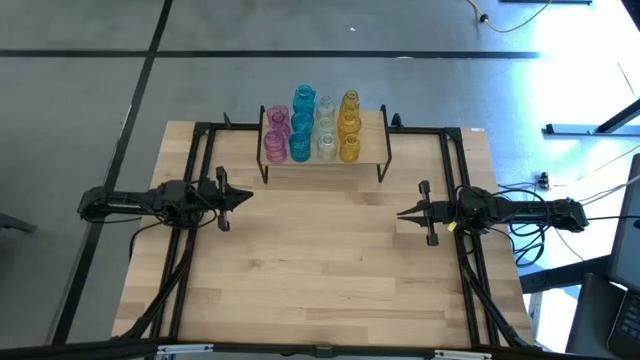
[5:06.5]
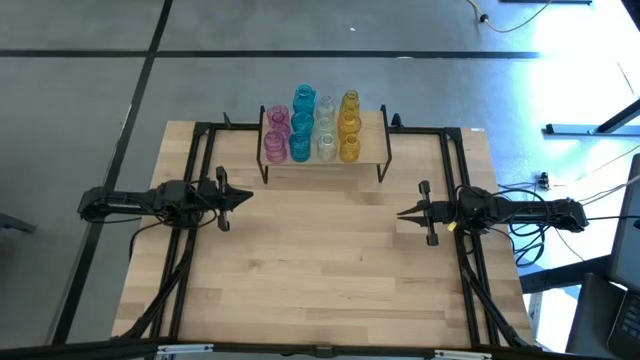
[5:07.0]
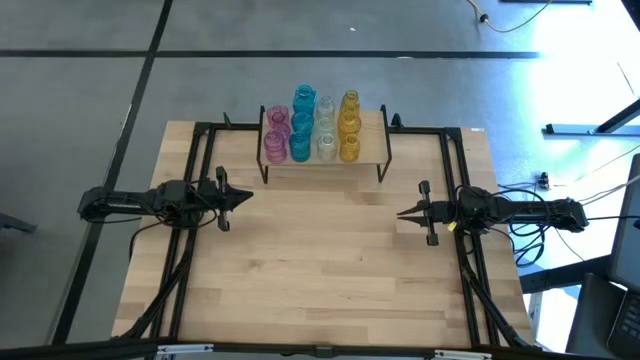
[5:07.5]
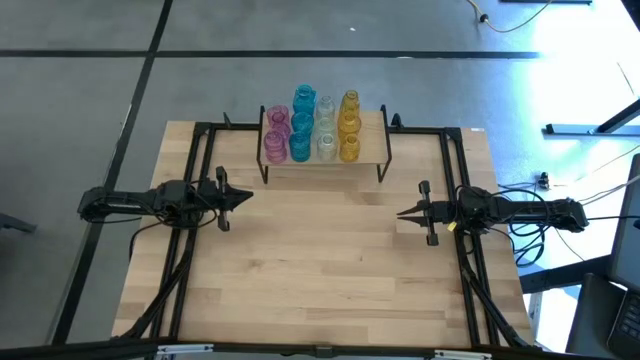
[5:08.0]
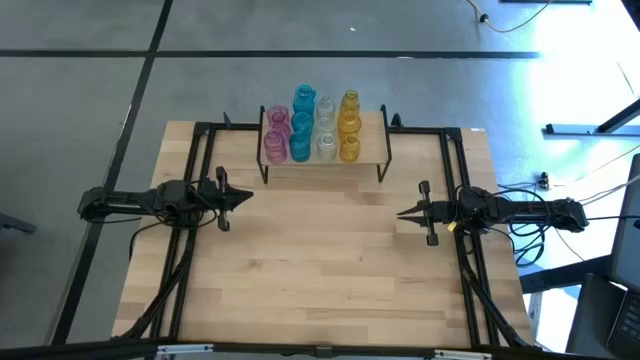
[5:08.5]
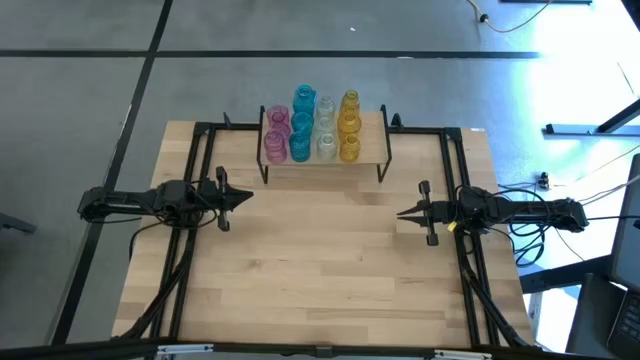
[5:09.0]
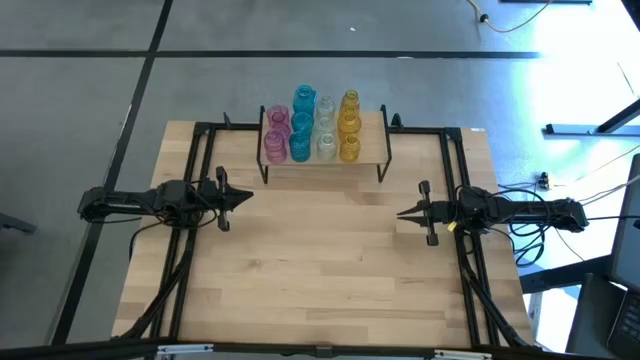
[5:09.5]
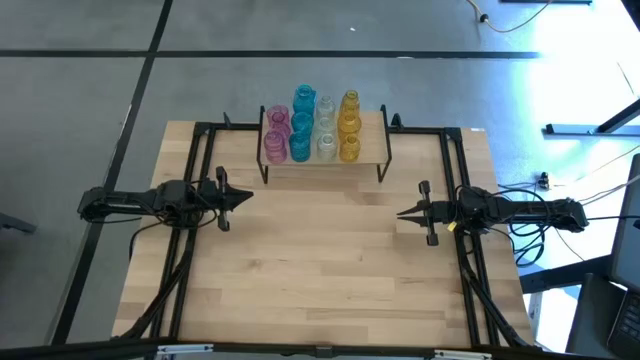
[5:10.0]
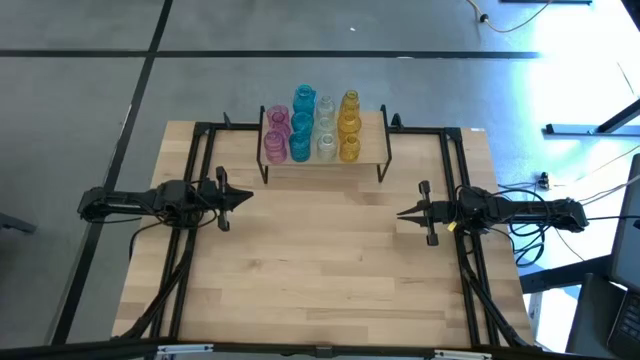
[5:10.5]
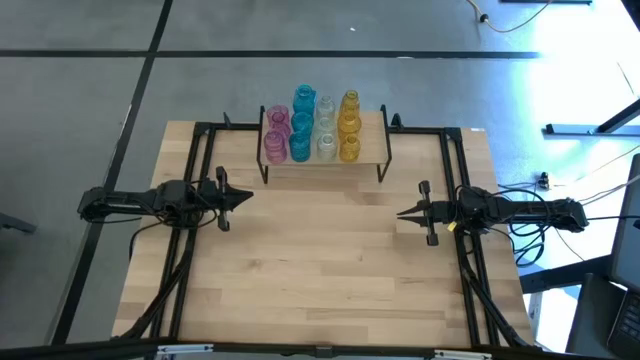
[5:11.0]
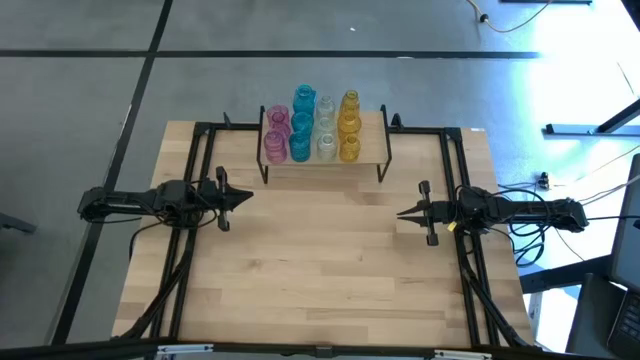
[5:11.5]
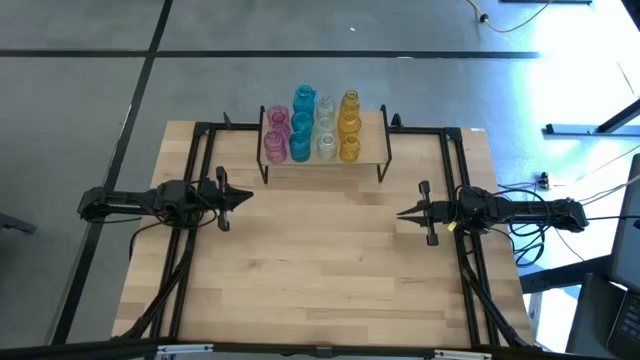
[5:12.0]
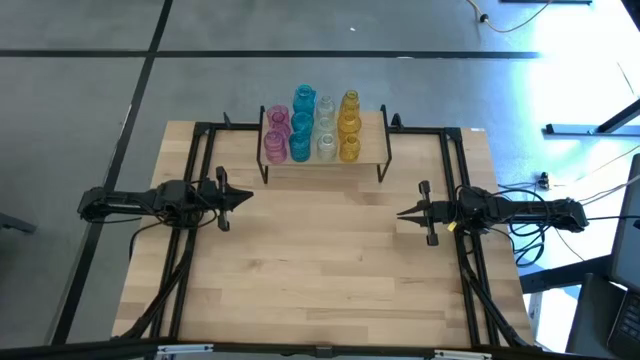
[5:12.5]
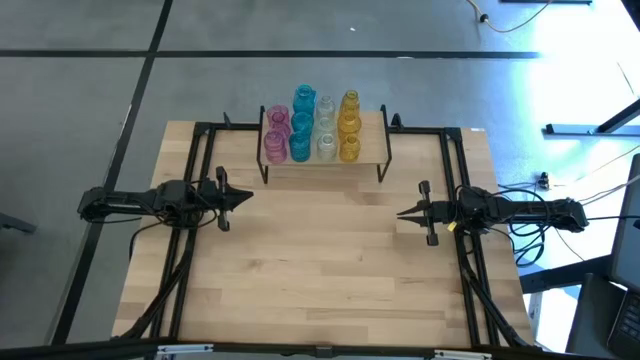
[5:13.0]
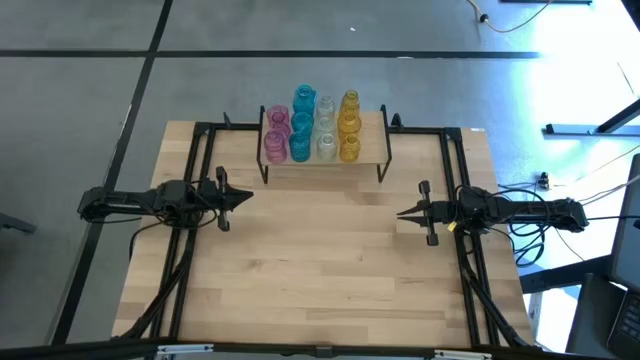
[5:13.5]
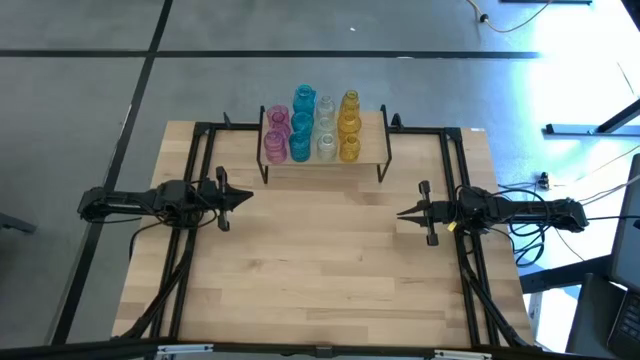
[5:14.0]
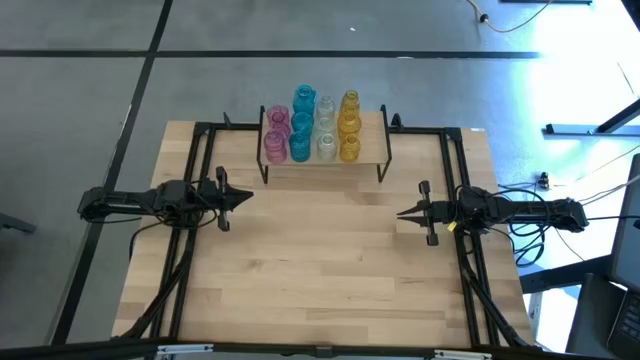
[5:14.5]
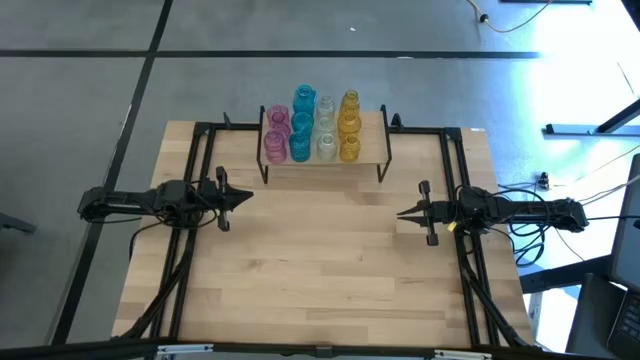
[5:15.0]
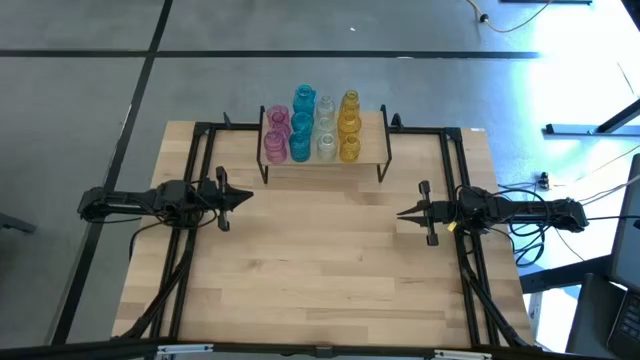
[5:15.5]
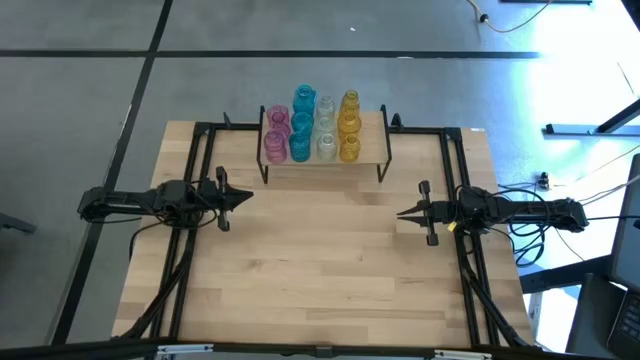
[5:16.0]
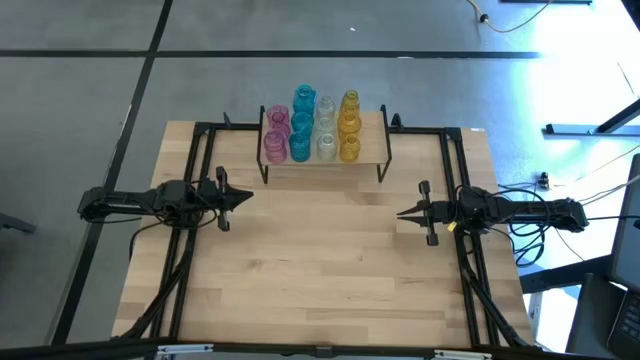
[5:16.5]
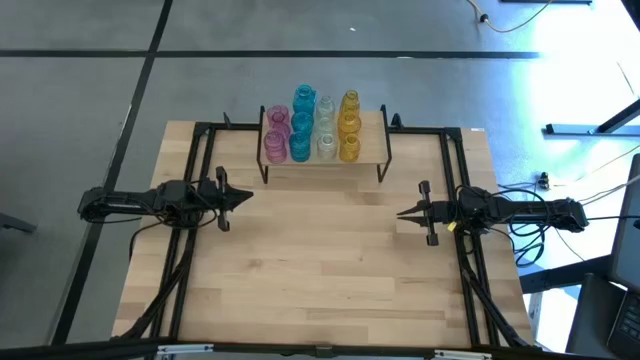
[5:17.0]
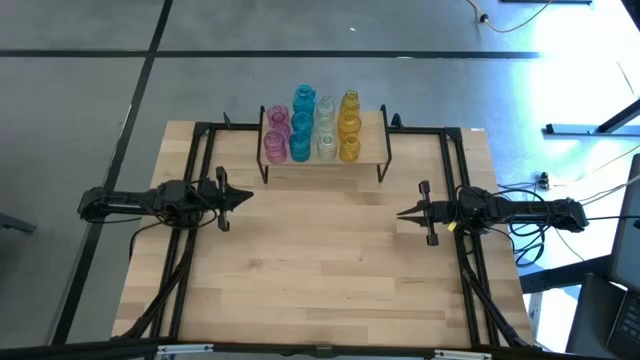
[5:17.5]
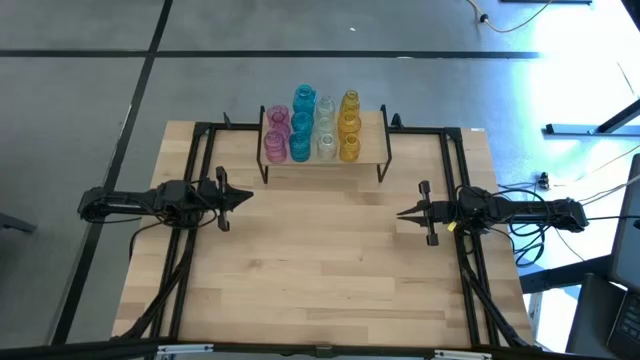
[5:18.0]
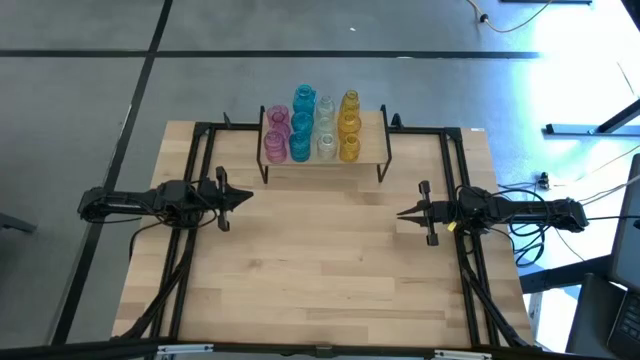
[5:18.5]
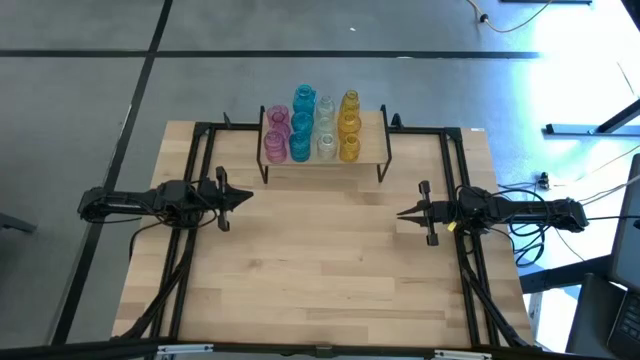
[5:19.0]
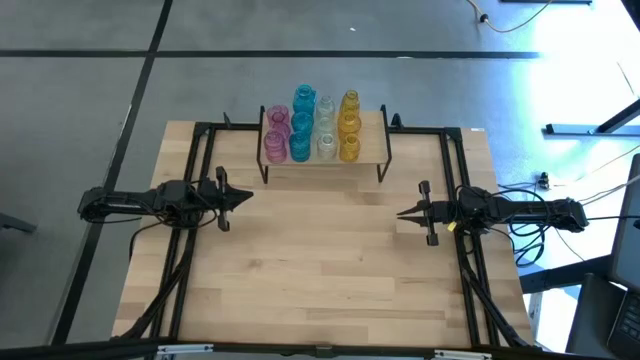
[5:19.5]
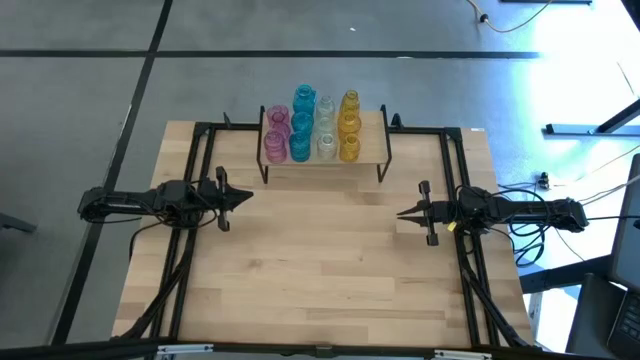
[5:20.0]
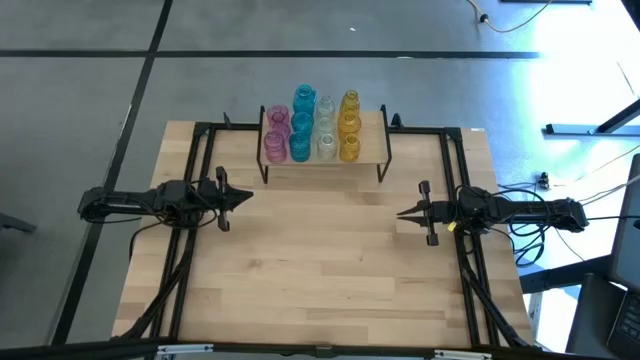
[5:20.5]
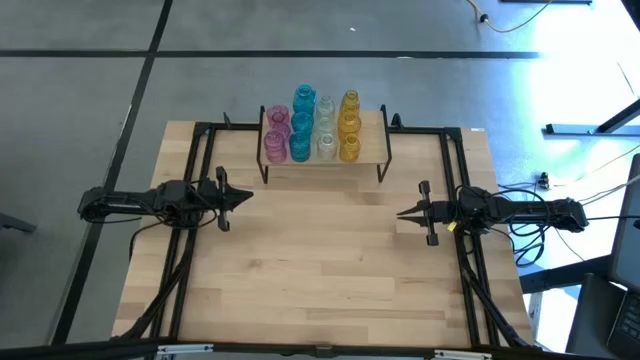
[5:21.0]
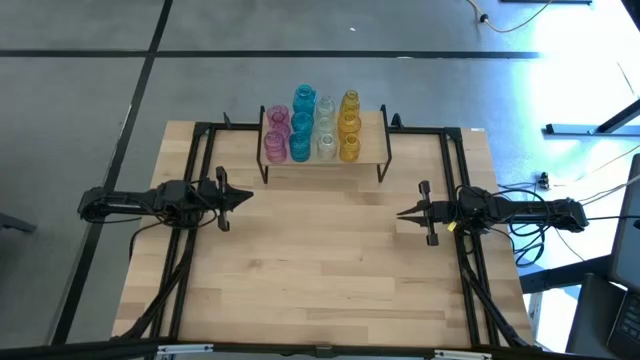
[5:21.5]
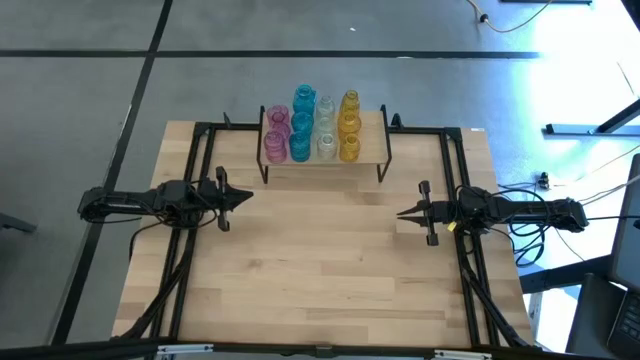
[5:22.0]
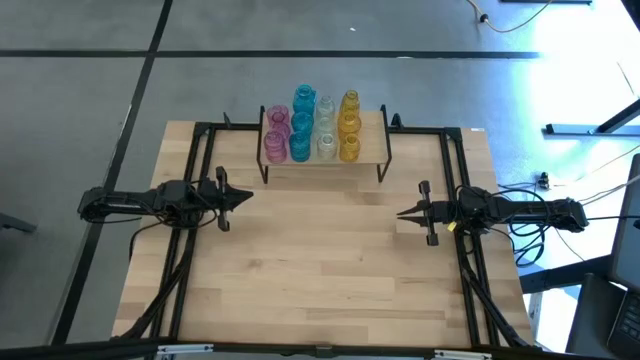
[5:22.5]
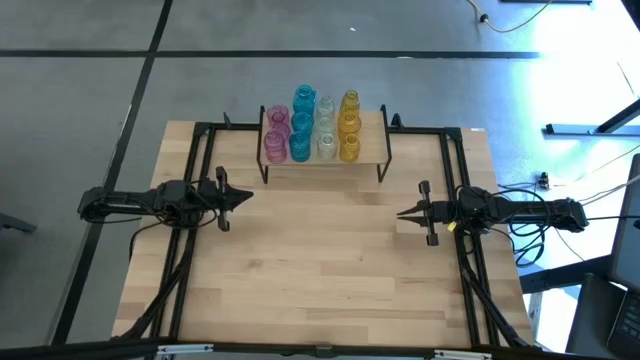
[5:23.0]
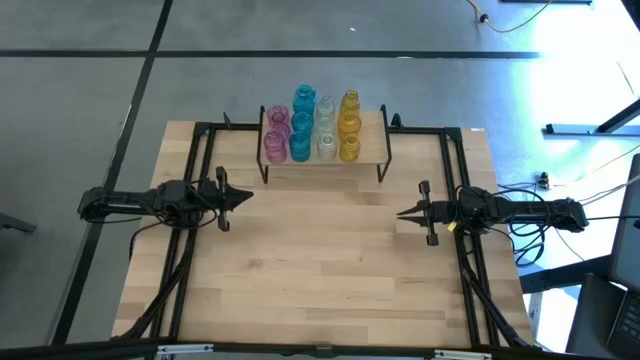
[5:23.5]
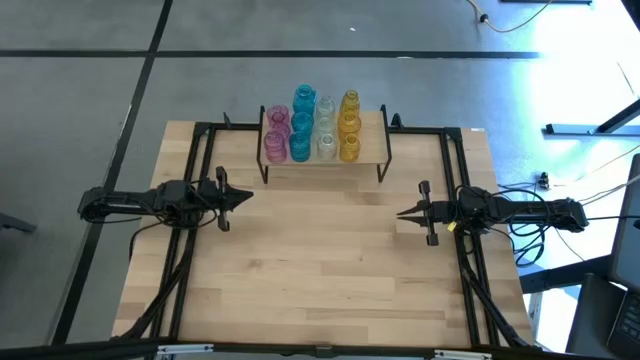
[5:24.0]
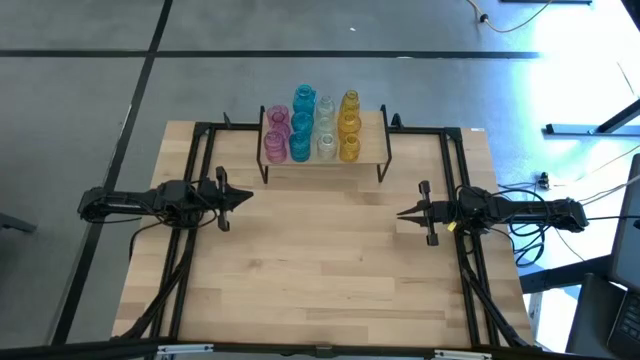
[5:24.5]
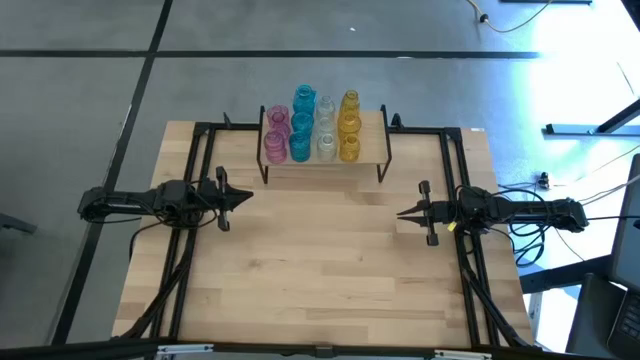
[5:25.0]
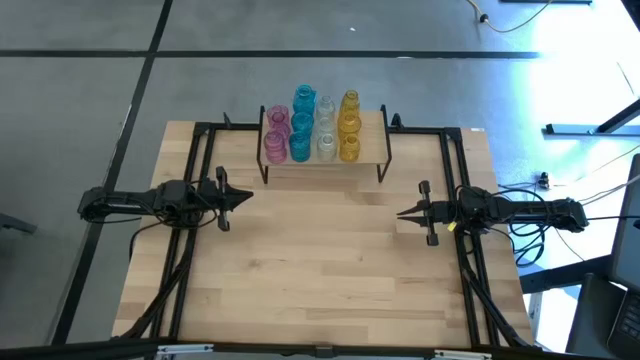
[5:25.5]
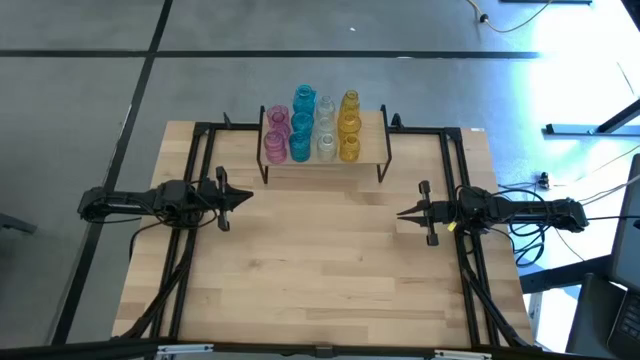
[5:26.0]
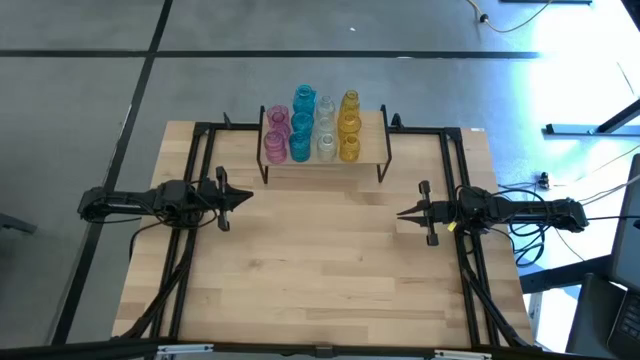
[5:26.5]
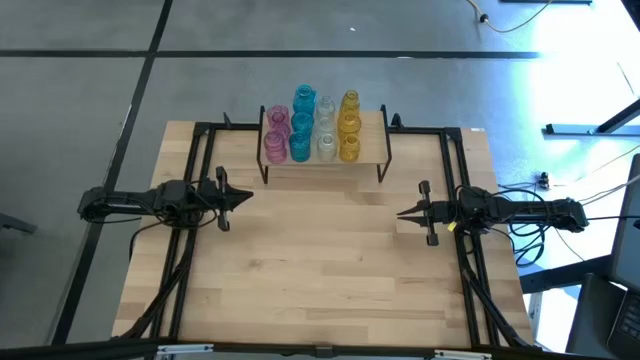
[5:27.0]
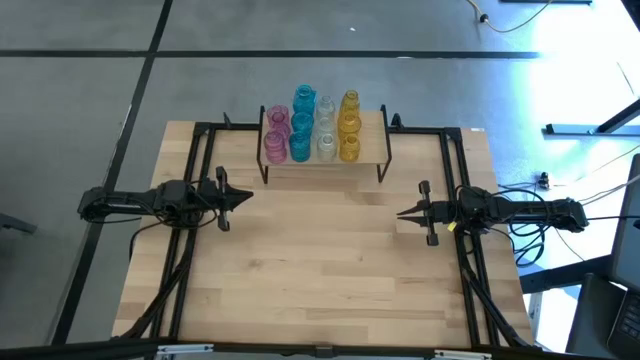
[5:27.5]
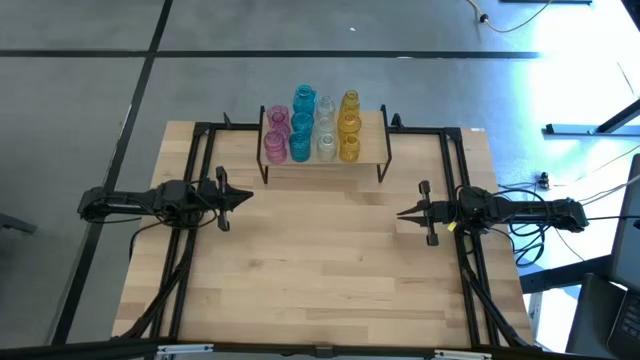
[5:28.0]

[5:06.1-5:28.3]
Task: sort vases onto shelf
Return to Home Position
